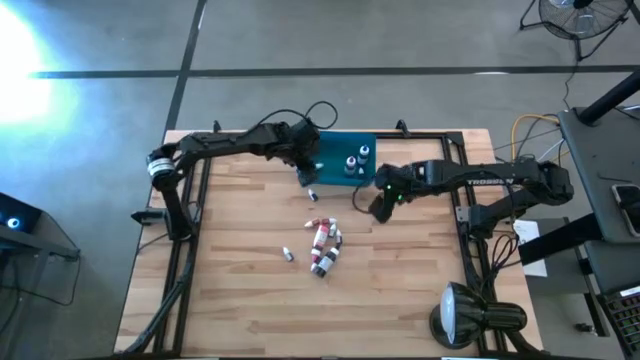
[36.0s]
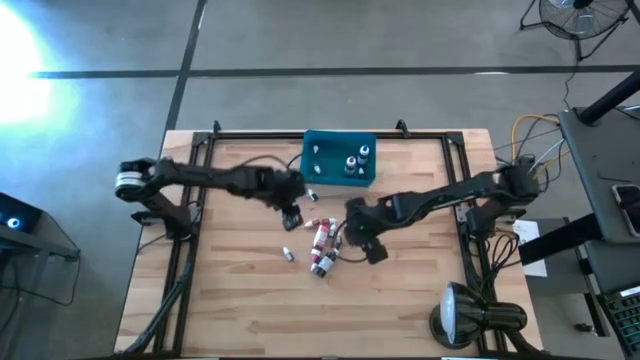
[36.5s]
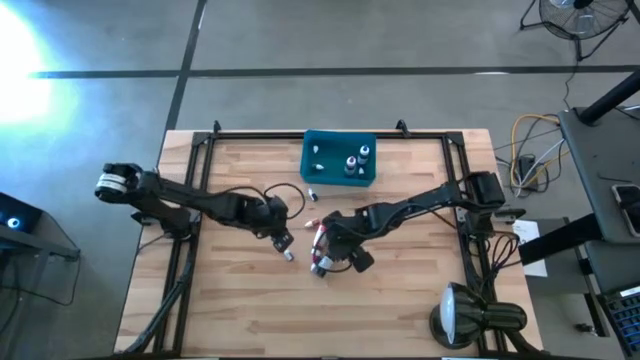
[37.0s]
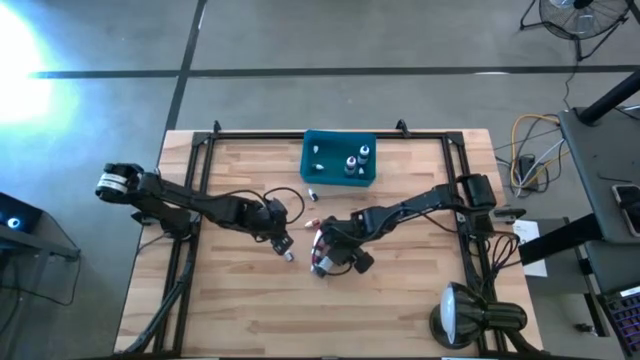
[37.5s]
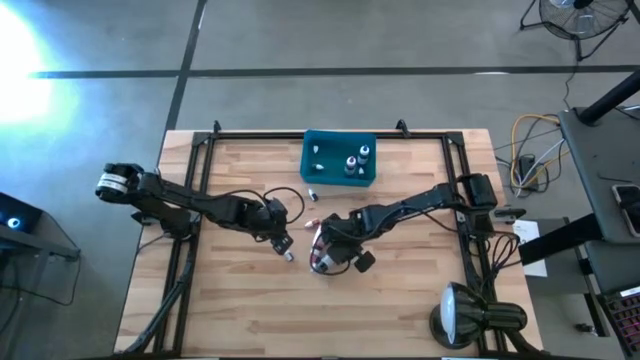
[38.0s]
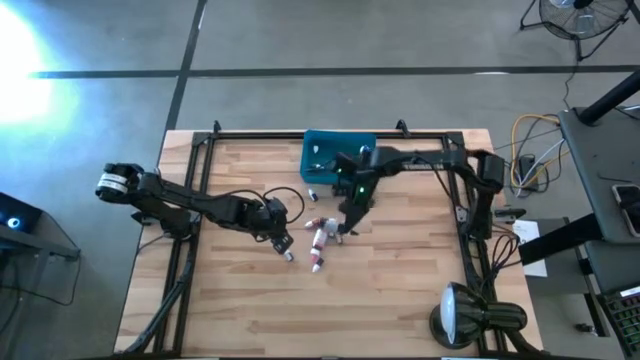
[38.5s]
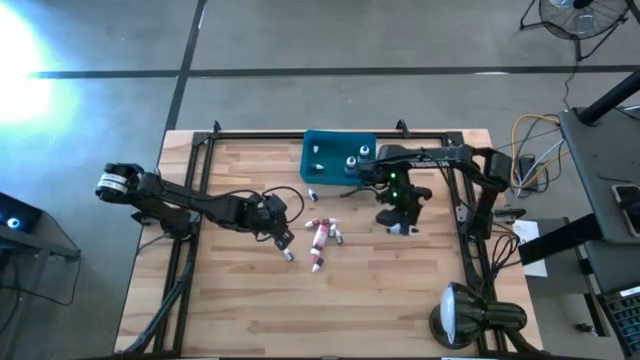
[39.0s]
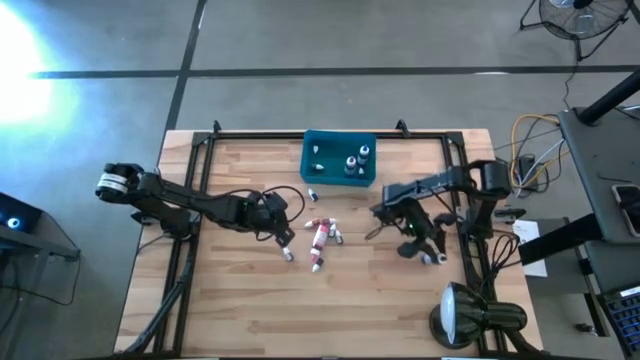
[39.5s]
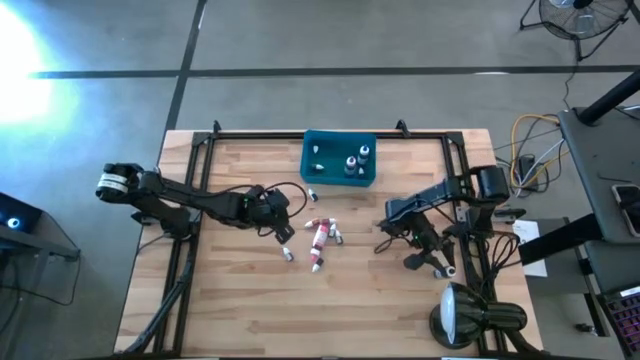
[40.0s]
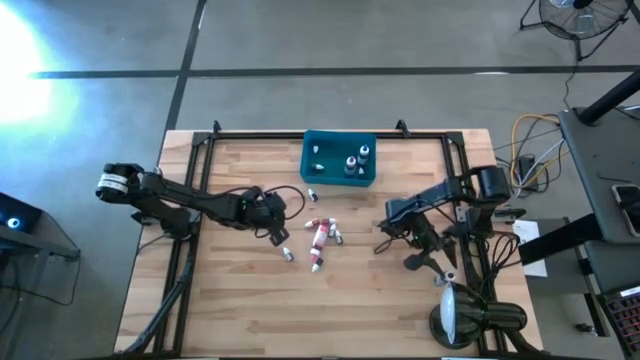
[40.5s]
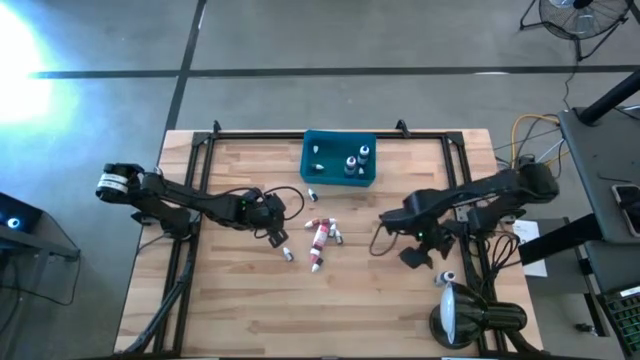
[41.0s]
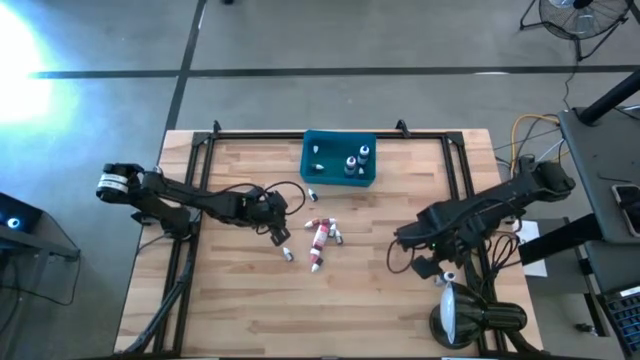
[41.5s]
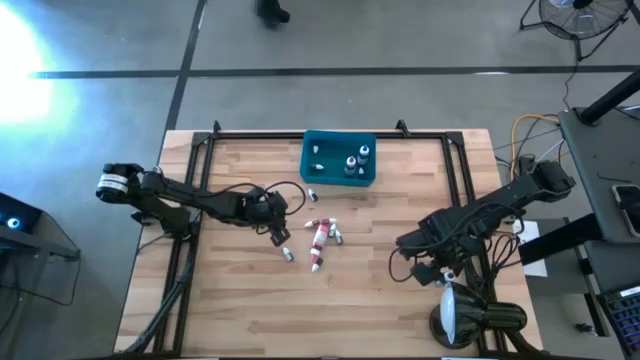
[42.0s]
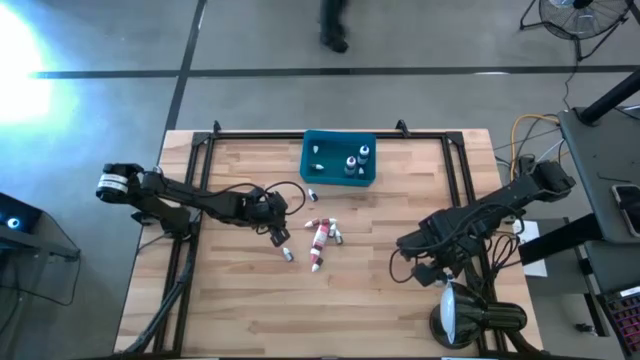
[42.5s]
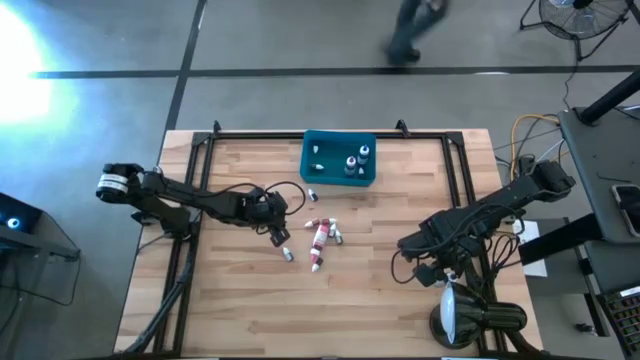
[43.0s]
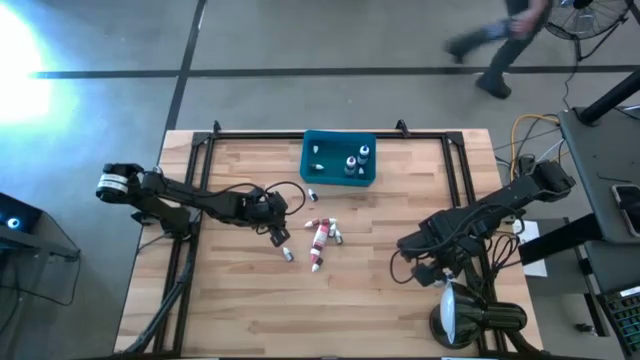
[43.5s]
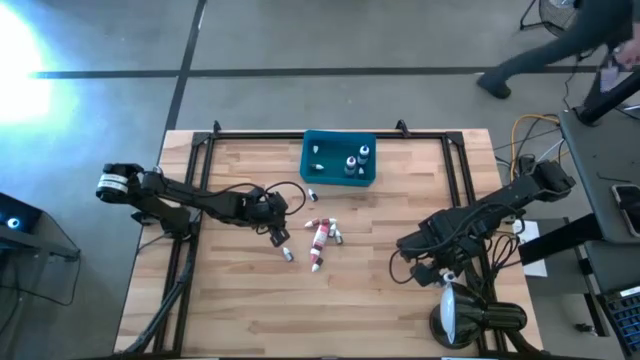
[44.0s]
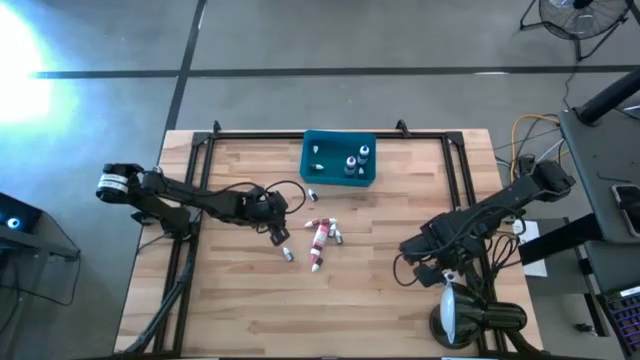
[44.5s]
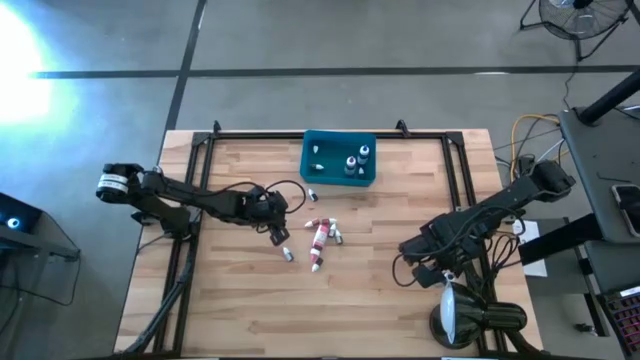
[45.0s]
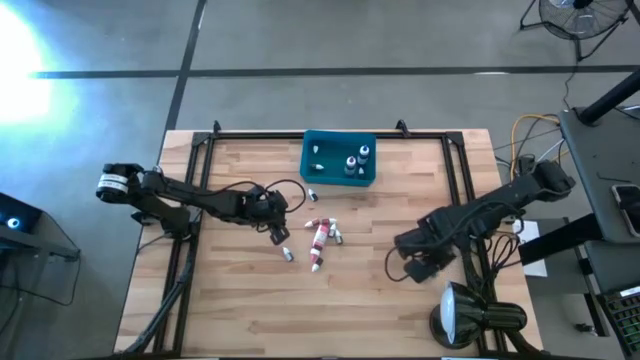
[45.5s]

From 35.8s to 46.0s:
Task: Pick & Place food coloring
Put the large black food coloring bottle into the blue bin

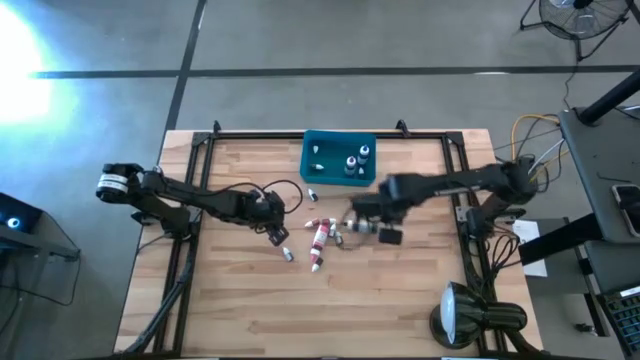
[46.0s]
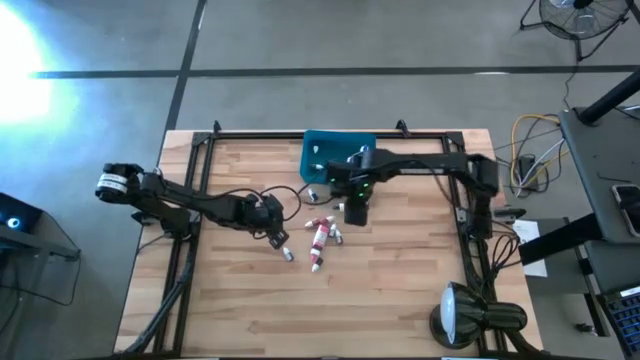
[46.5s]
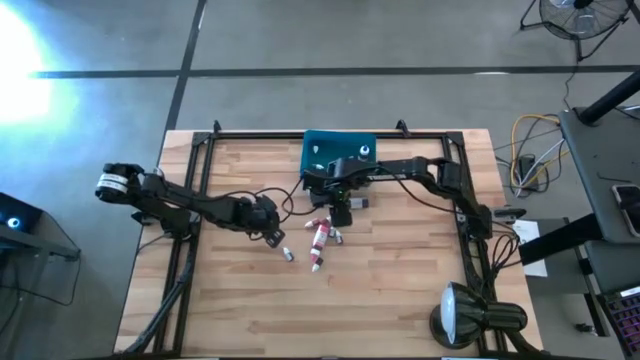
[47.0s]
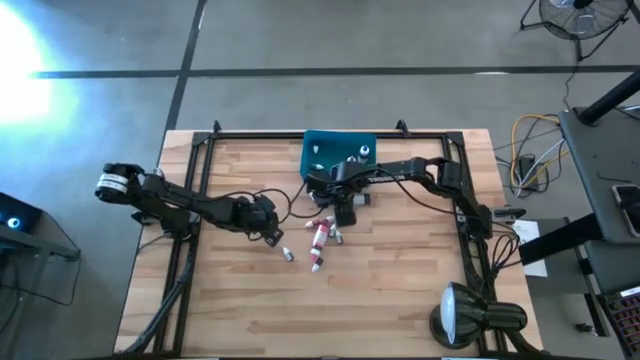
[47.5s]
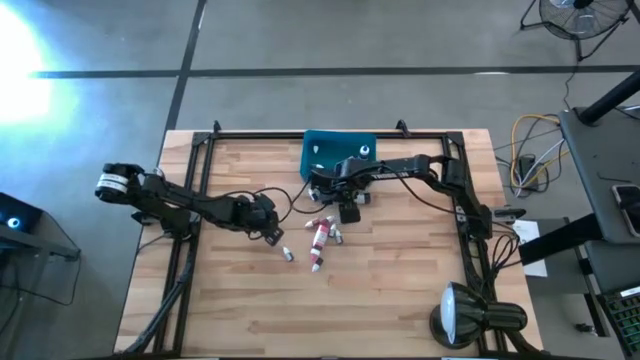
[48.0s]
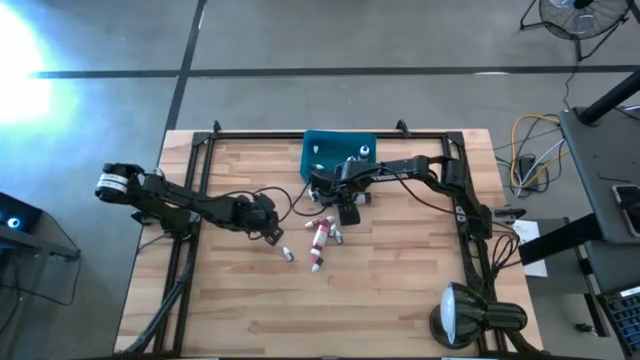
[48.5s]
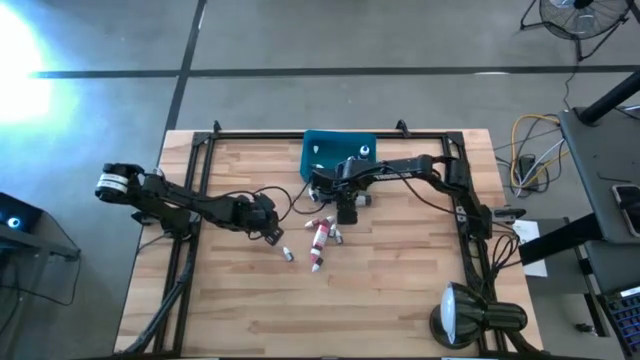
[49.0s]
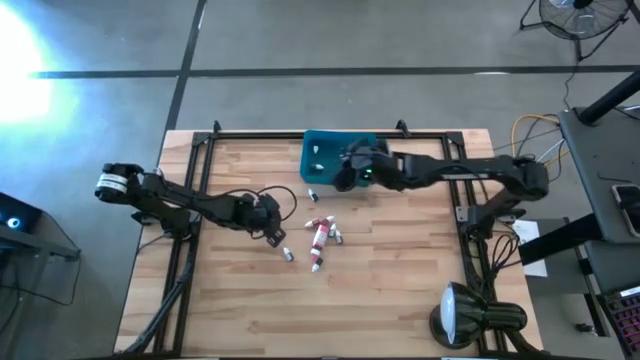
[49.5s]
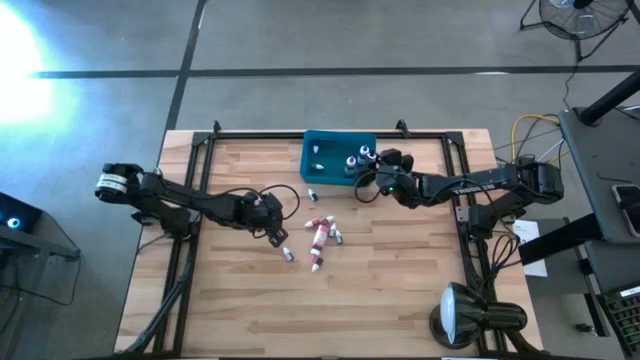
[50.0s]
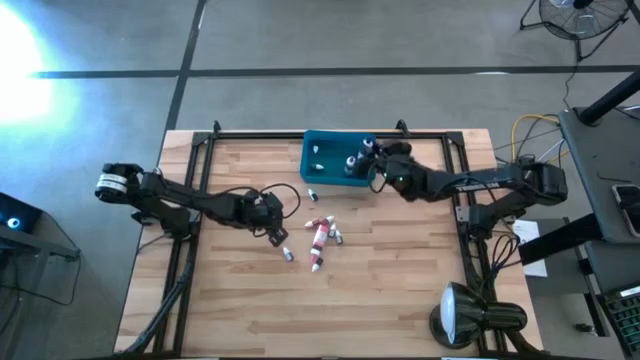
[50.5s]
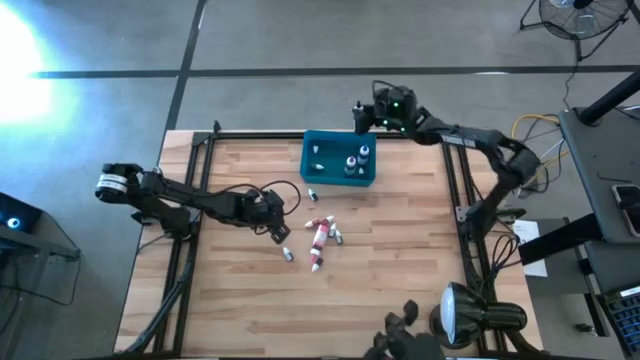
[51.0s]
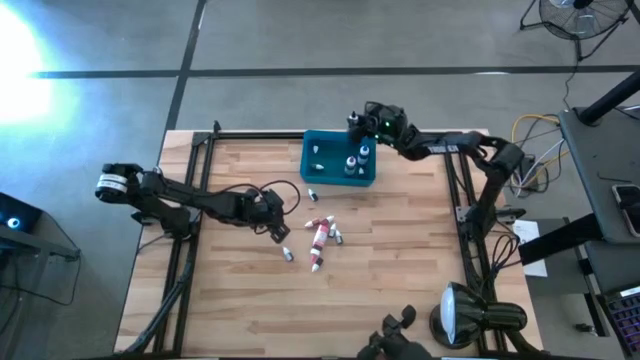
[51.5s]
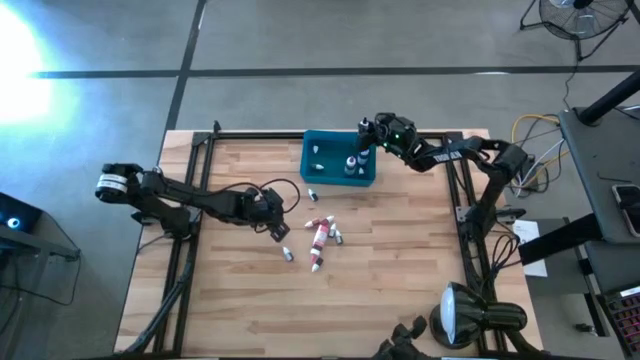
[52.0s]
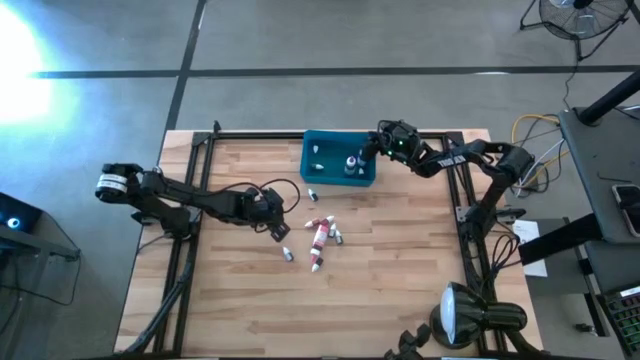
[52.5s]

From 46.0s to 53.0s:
Put the large black food coloring bottle into the blue bin

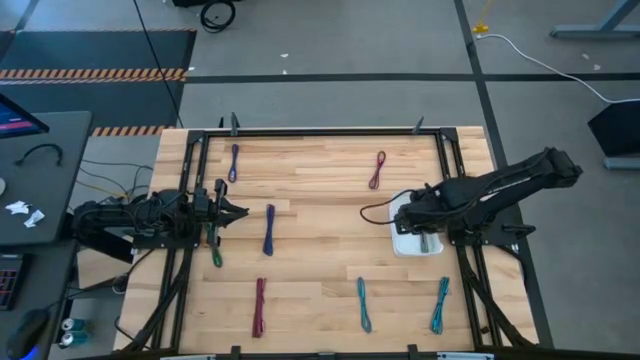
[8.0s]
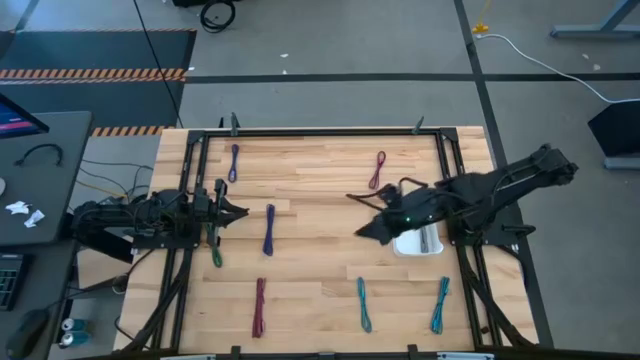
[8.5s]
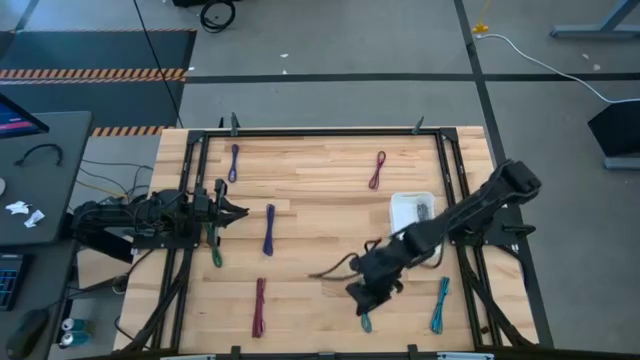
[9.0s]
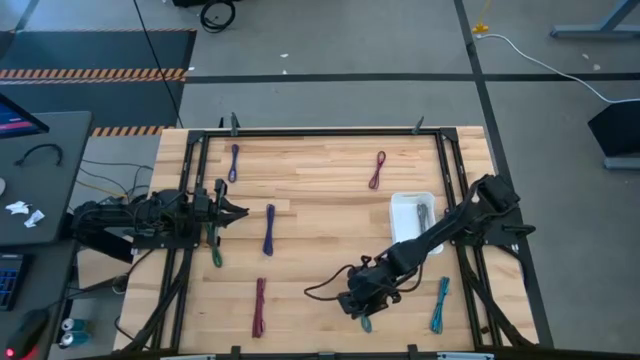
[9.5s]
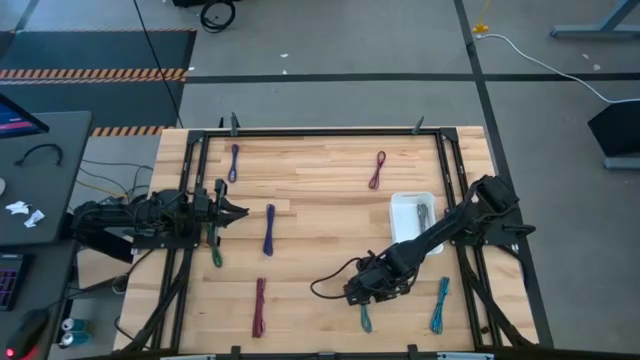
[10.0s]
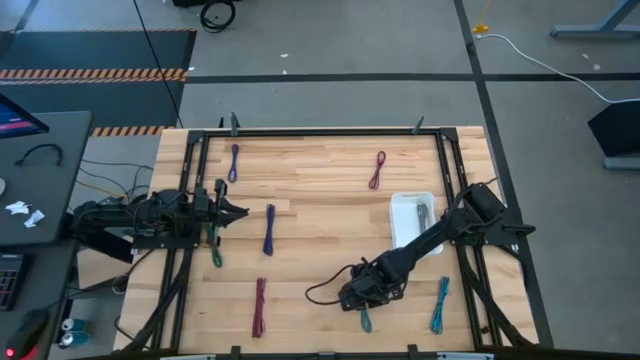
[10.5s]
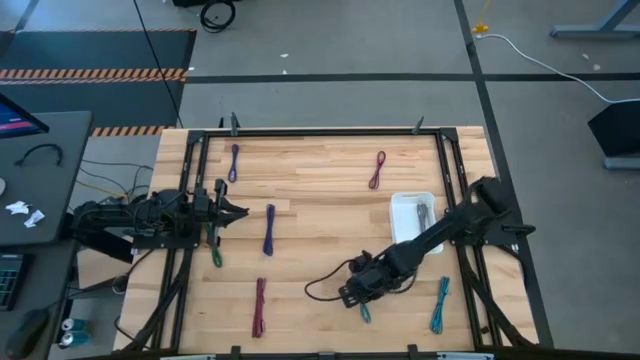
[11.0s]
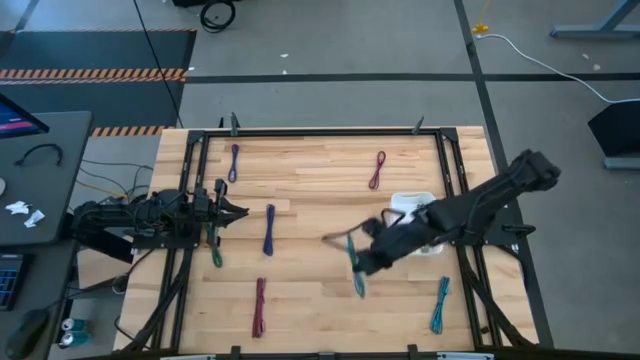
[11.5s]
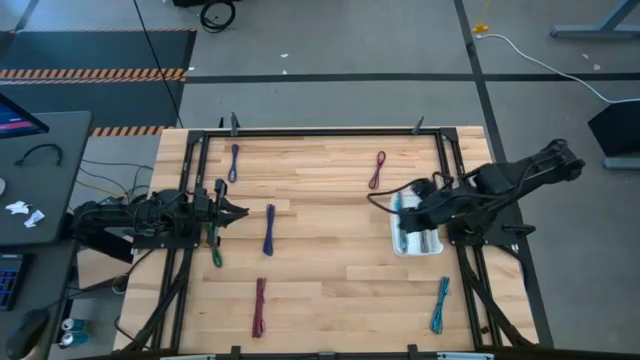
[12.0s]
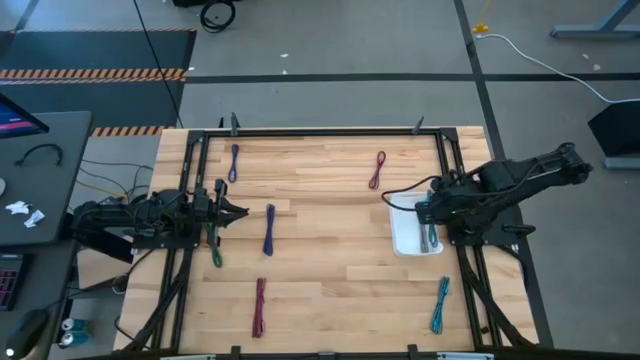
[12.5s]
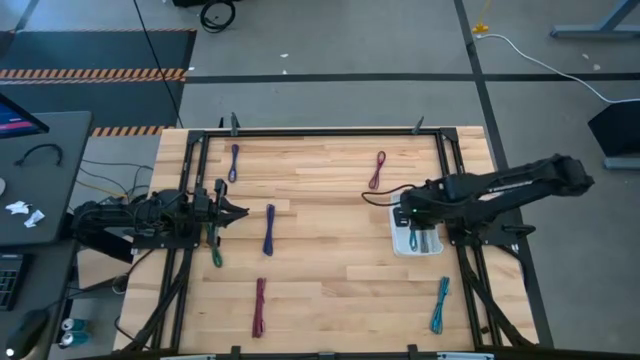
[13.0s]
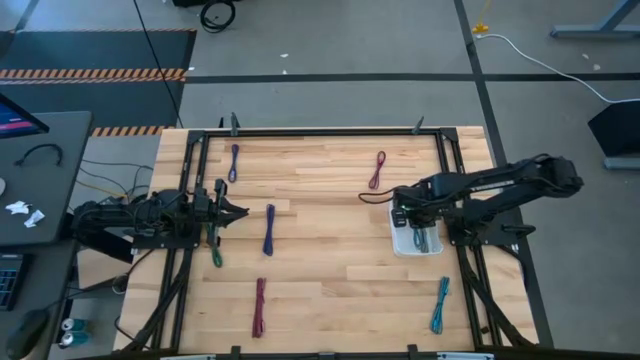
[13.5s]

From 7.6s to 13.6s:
Task: Pick and place USB-C Cables
Put the left blue charging cable into the white bin
